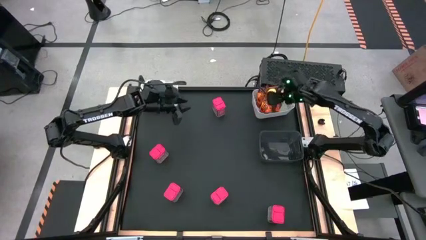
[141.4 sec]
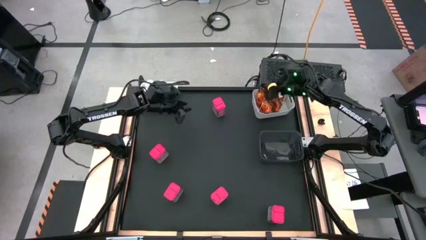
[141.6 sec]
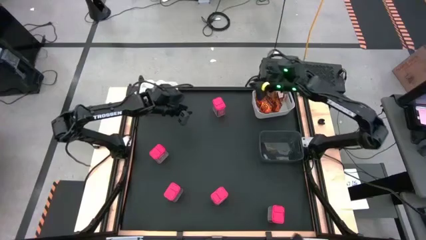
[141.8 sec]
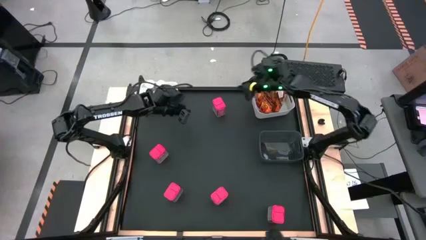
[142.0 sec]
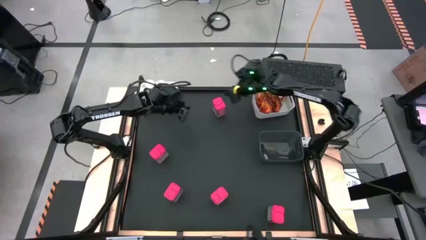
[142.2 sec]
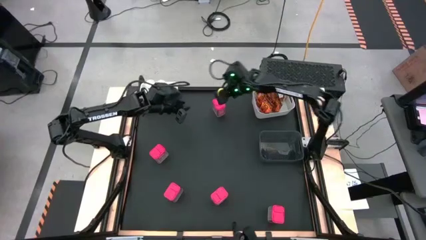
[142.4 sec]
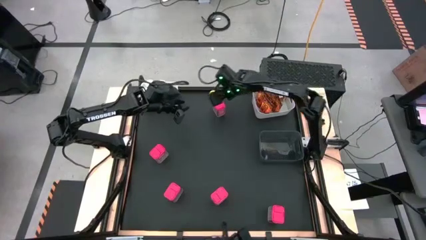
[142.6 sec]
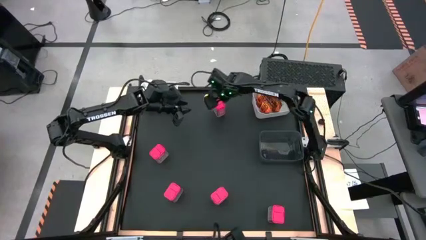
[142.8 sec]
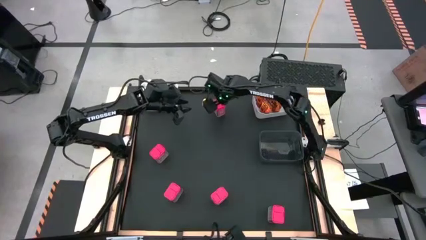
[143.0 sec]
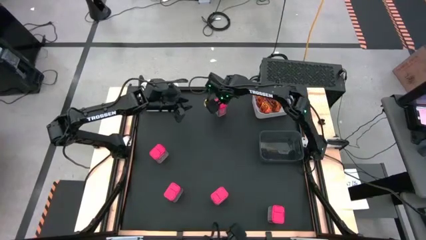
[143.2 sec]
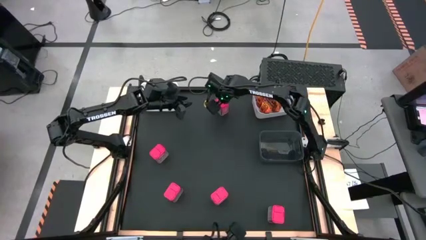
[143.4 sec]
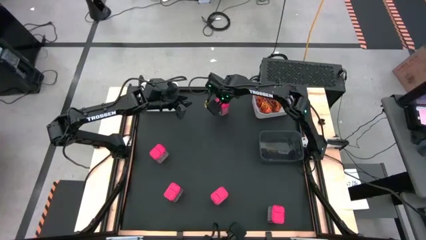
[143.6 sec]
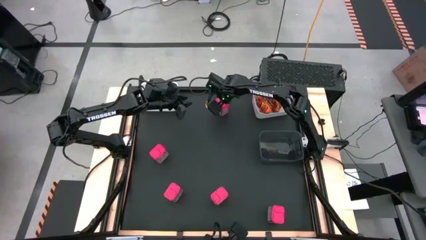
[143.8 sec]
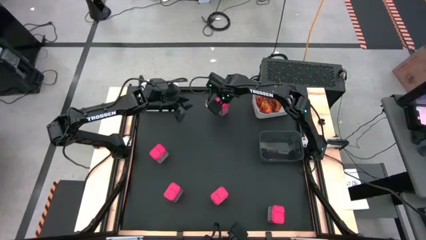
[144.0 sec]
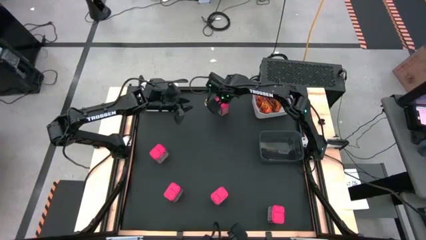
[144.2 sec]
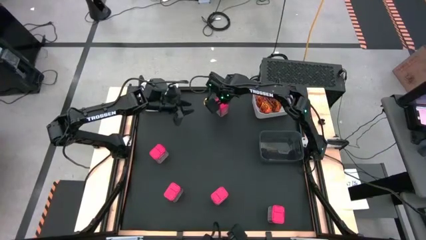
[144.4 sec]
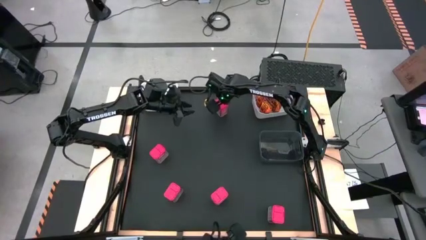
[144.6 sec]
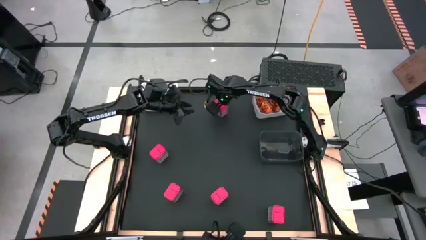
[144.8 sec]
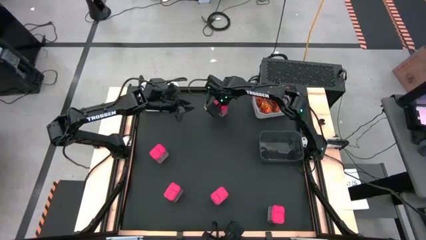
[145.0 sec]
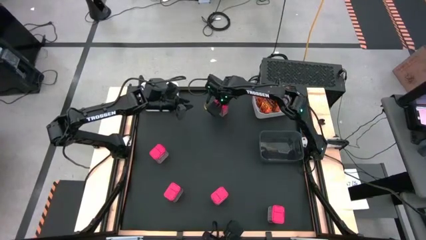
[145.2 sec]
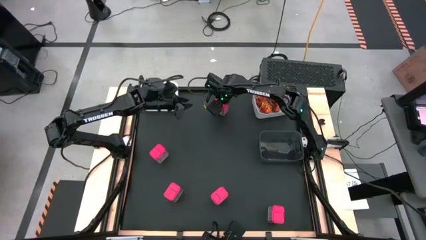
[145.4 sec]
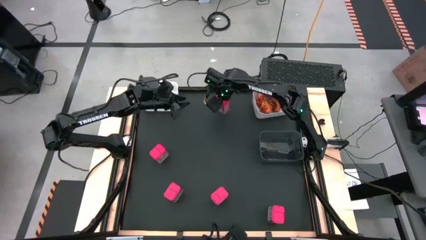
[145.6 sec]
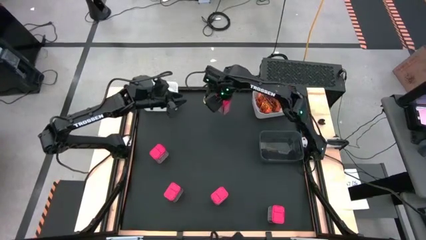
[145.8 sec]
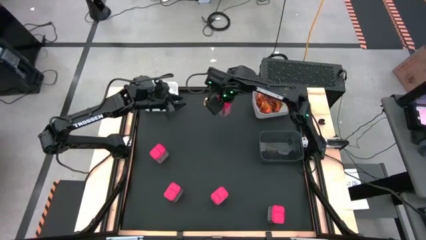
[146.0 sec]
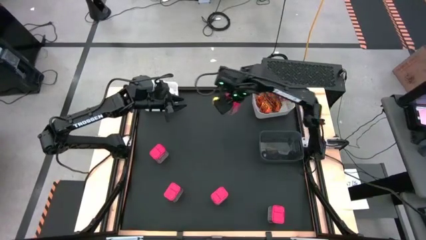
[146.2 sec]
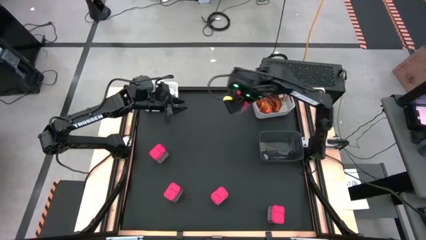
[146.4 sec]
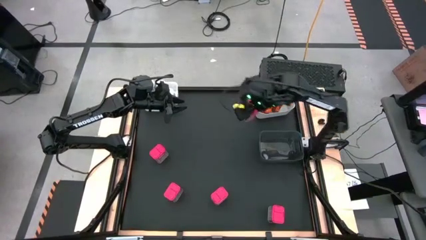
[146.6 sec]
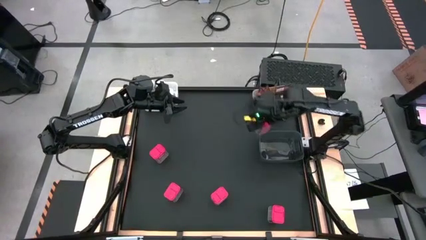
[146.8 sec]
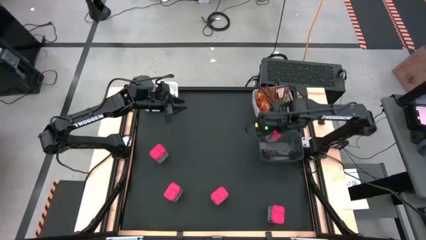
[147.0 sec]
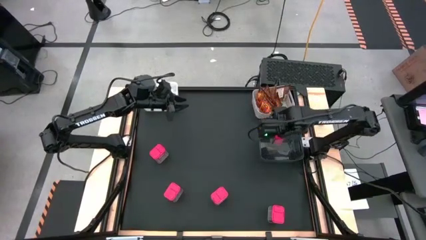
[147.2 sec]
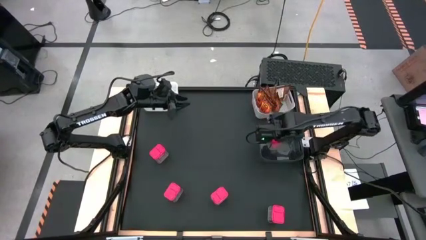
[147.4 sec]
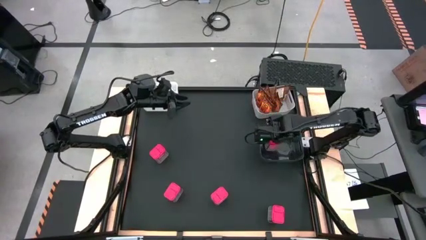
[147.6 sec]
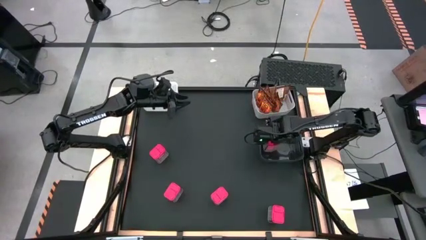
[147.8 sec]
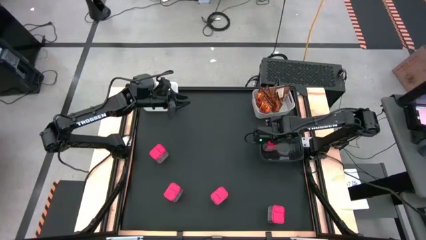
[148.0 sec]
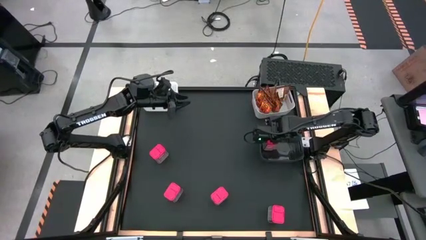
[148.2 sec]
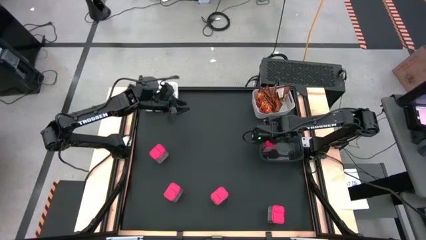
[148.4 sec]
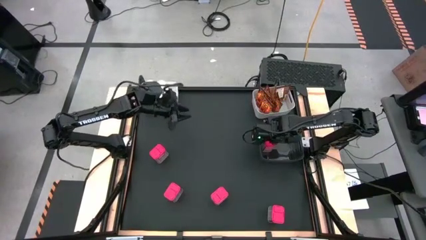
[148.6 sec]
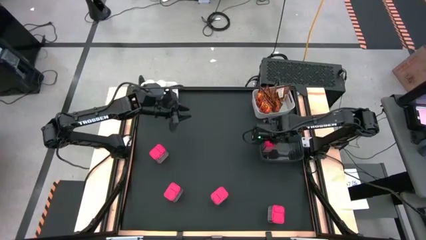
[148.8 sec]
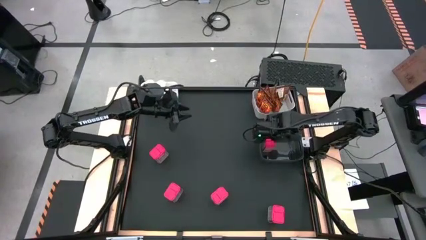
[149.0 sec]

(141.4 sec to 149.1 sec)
Task: Sort spices by type
Put the red seasoning can into the black transparent bin

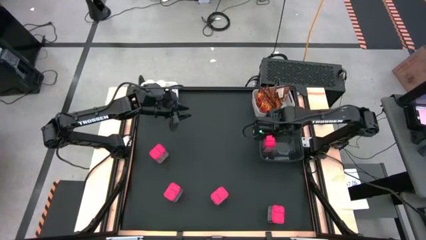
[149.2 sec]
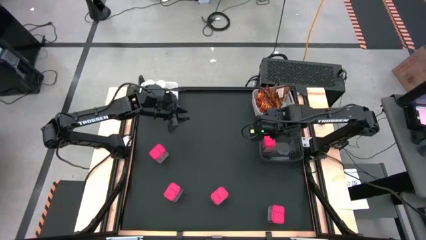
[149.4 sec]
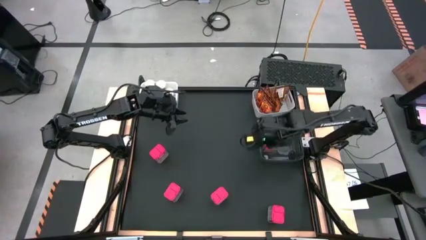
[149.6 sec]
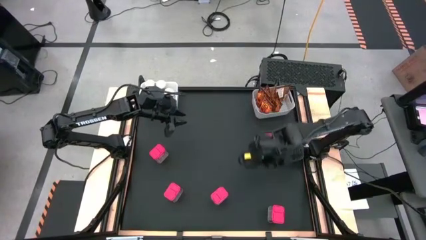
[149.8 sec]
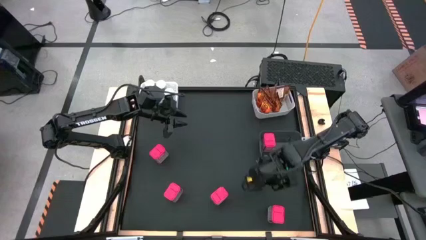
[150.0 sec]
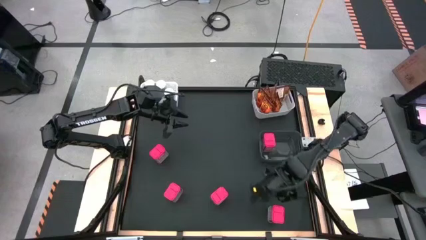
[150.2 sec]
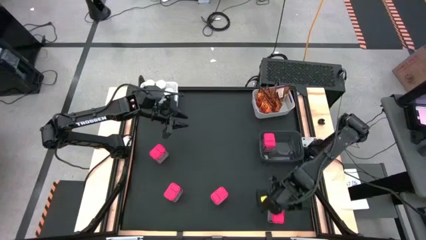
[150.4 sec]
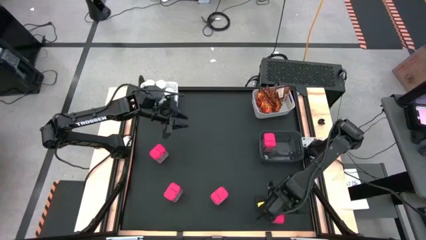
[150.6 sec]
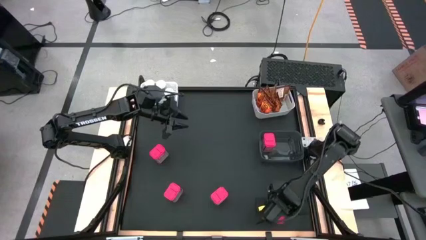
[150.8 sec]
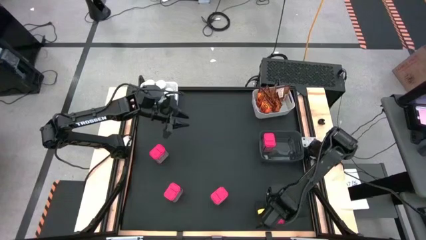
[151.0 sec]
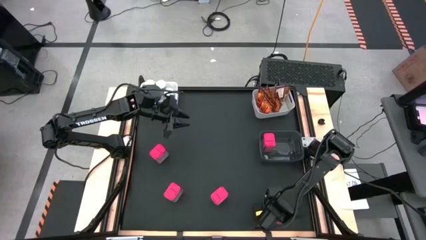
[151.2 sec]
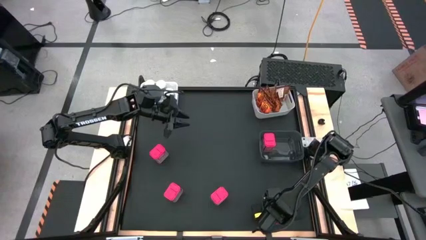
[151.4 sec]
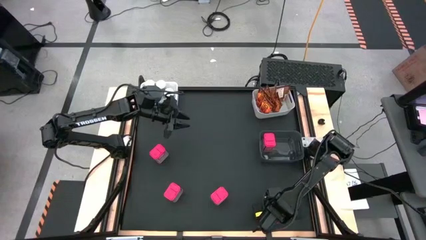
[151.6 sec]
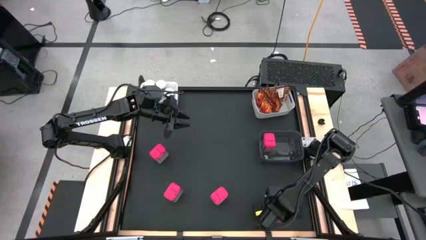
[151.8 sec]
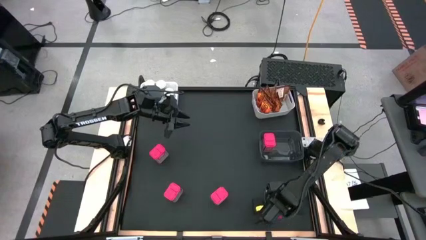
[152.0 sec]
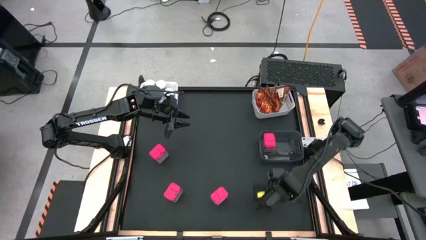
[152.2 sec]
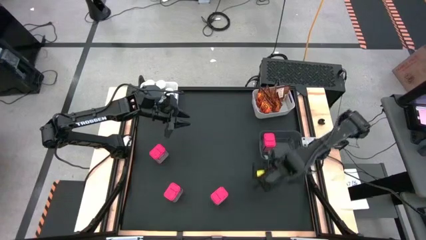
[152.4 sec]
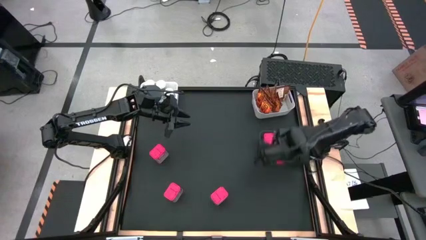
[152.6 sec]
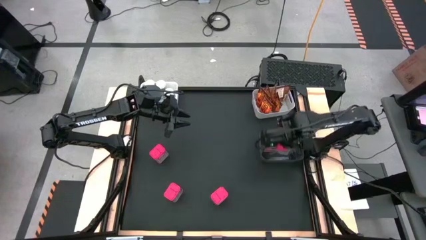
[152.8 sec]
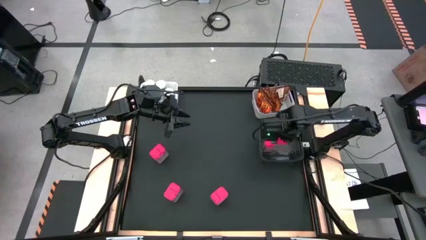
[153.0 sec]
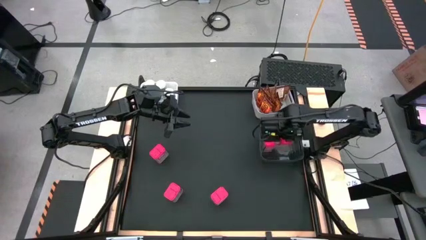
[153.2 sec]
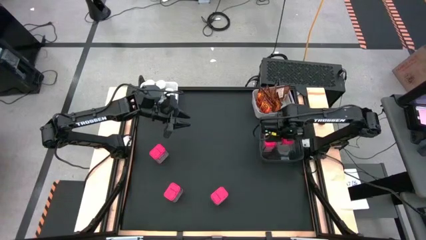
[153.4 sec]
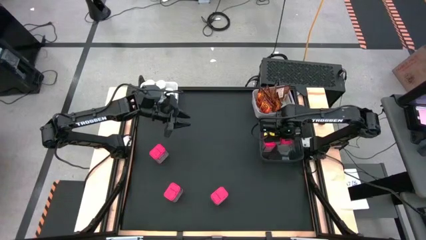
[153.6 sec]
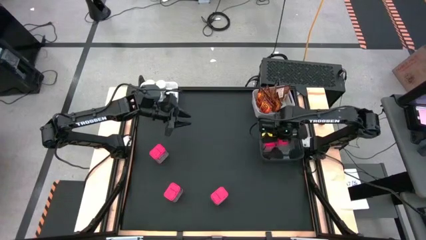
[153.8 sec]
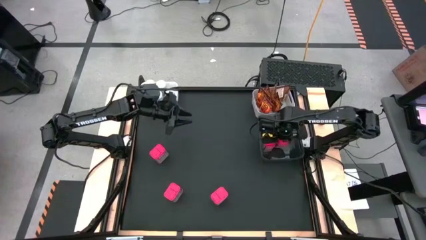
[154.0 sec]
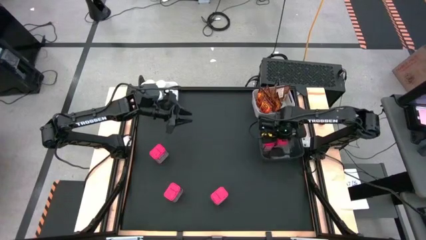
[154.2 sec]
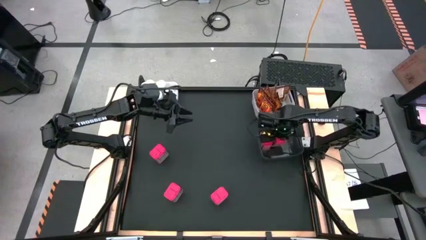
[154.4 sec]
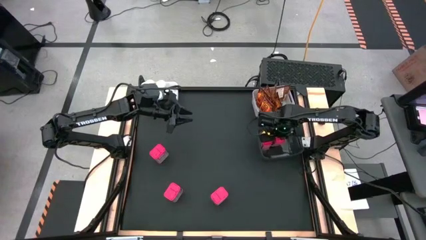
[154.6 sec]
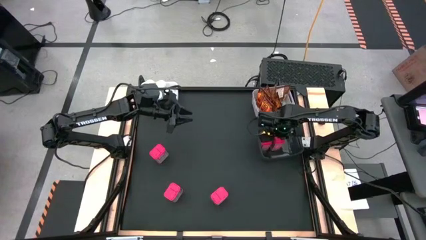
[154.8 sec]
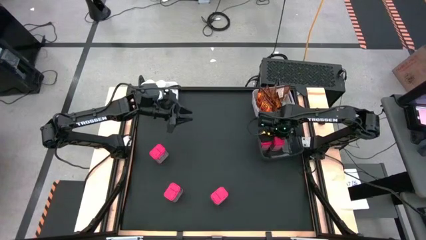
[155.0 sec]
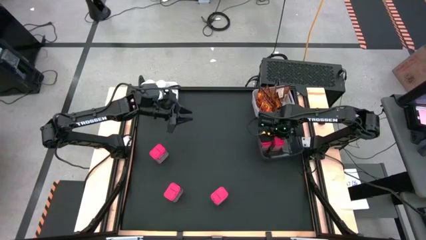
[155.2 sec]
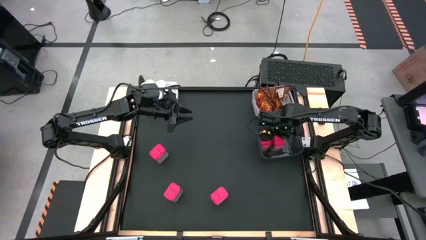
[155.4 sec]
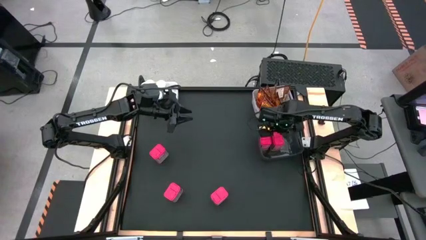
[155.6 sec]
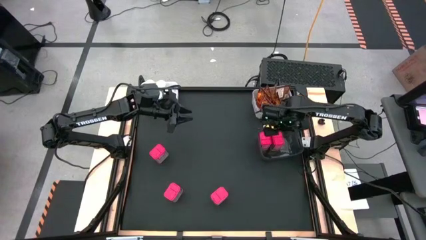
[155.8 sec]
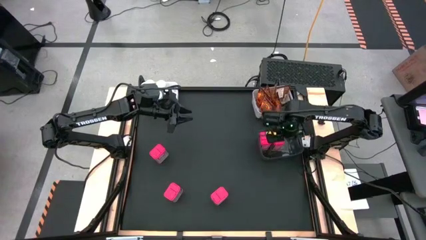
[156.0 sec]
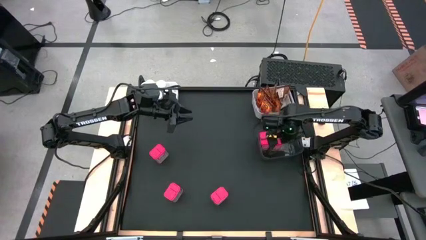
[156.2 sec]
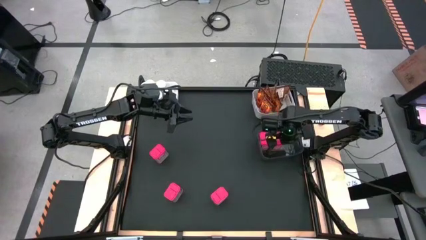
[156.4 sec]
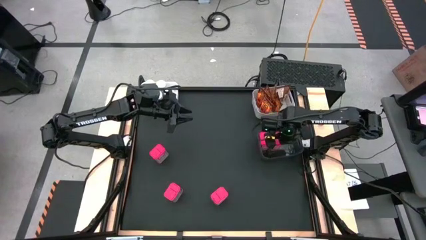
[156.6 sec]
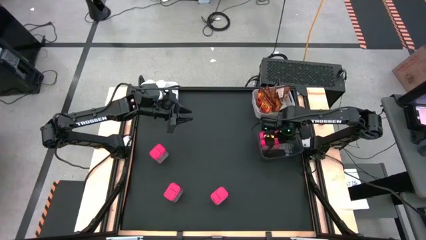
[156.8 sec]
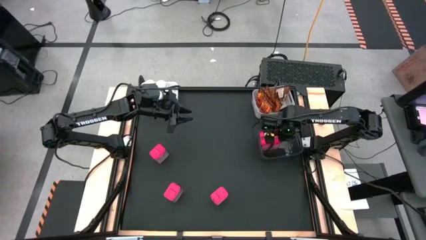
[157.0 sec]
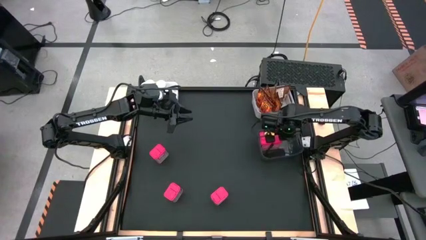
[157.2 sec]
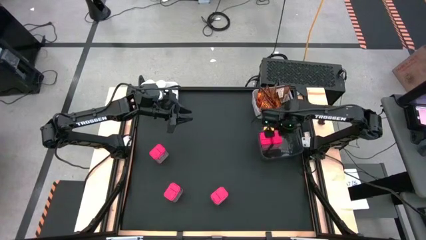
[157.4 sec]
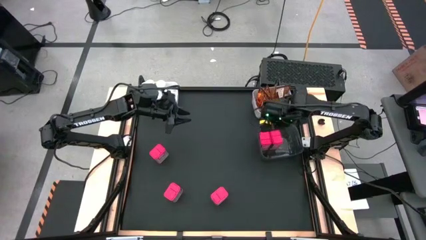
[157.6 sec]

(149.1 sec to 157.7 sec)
Put the red seasoning can into the black transparent bin
